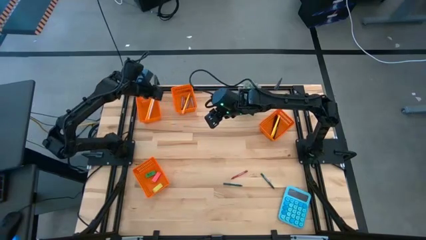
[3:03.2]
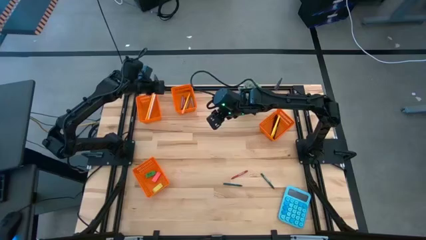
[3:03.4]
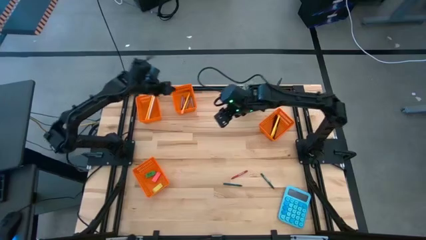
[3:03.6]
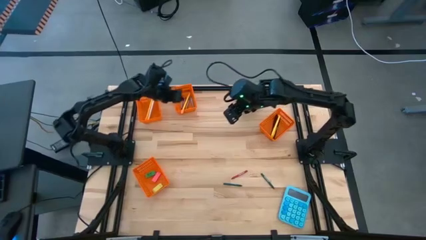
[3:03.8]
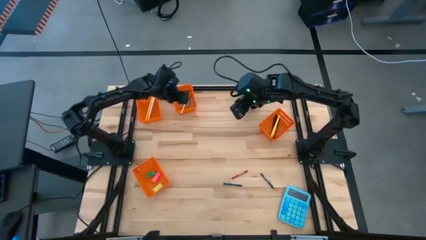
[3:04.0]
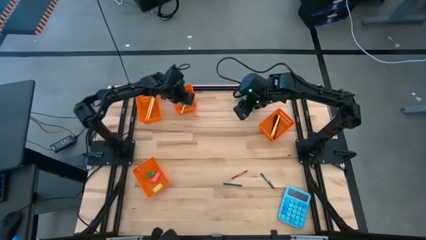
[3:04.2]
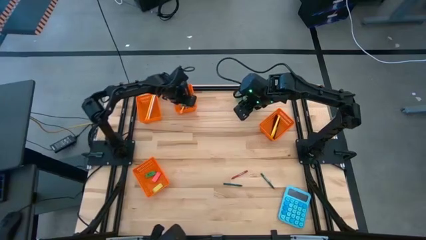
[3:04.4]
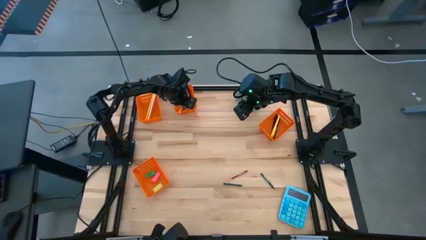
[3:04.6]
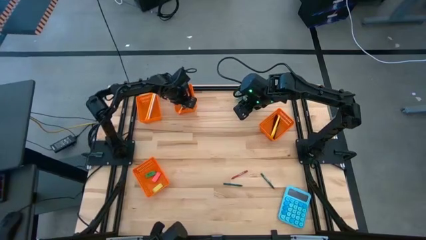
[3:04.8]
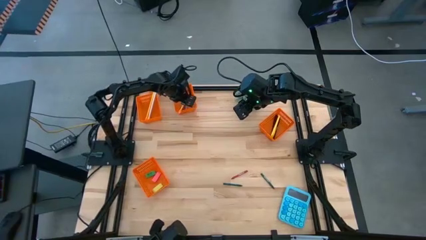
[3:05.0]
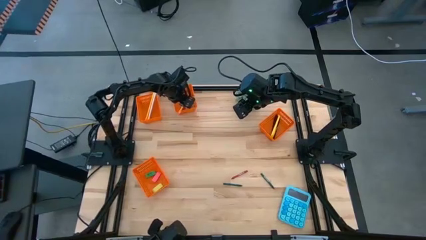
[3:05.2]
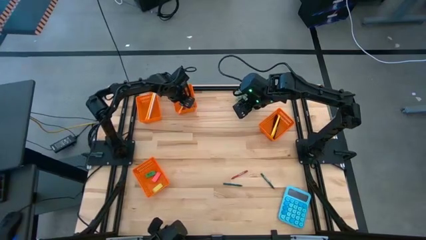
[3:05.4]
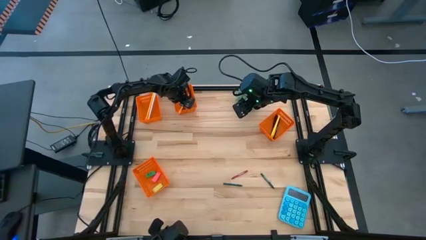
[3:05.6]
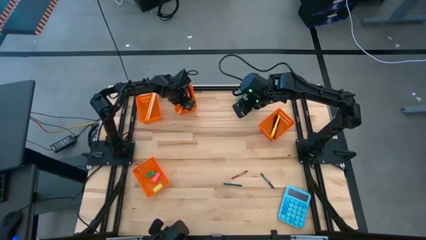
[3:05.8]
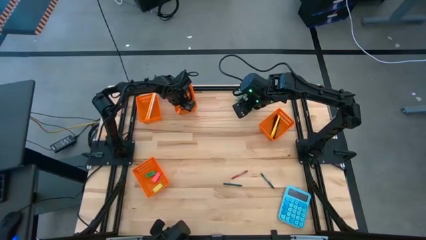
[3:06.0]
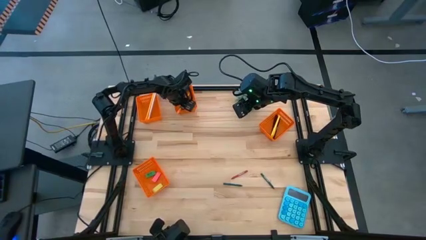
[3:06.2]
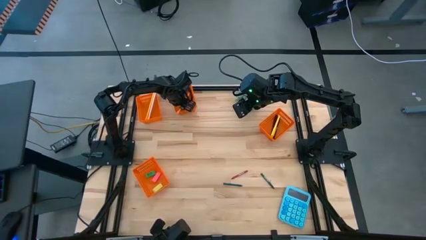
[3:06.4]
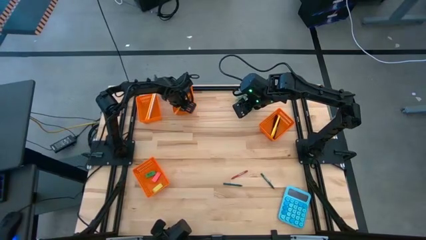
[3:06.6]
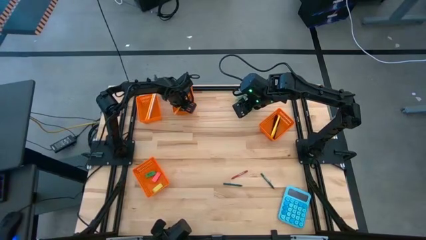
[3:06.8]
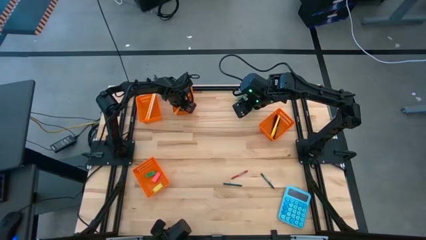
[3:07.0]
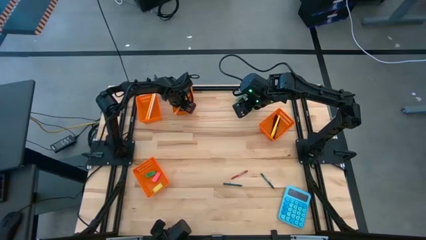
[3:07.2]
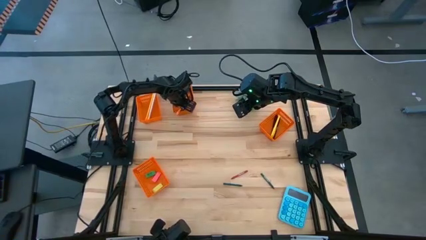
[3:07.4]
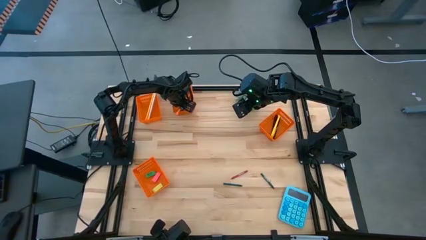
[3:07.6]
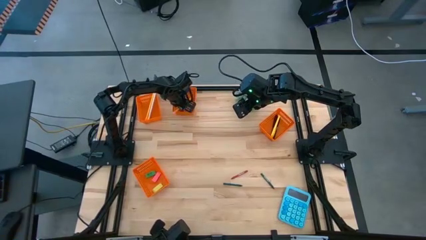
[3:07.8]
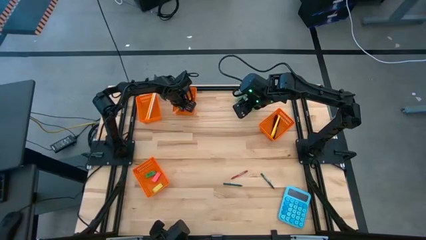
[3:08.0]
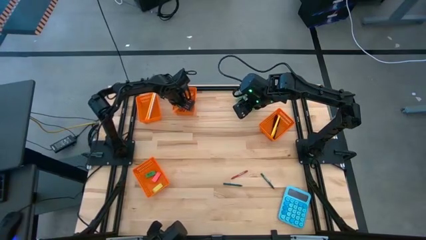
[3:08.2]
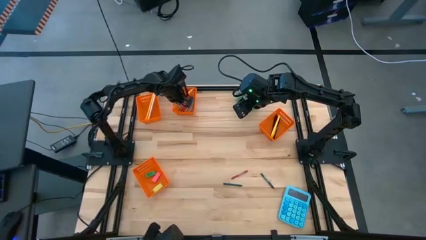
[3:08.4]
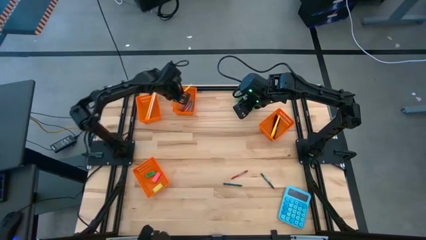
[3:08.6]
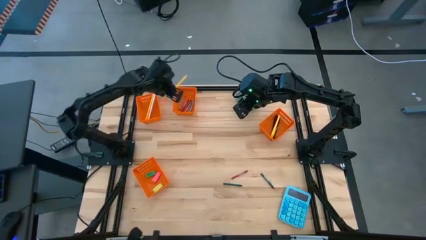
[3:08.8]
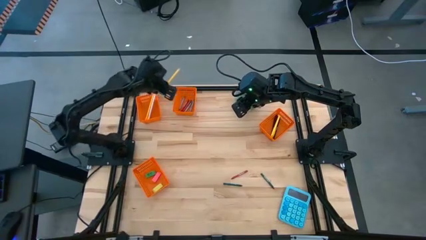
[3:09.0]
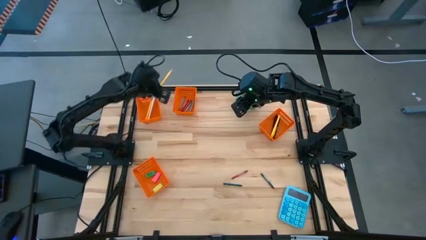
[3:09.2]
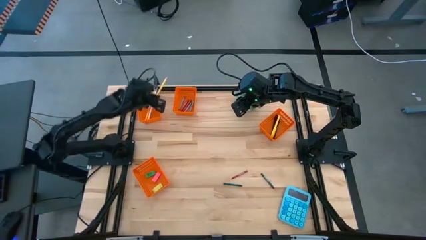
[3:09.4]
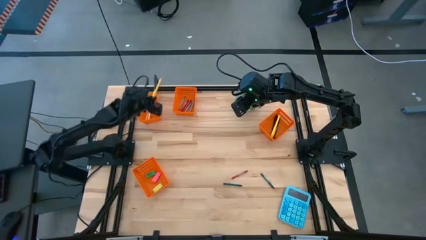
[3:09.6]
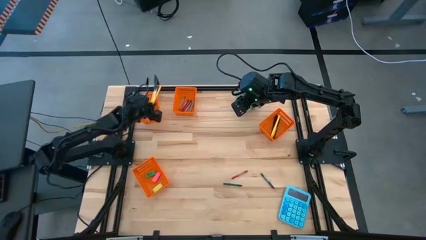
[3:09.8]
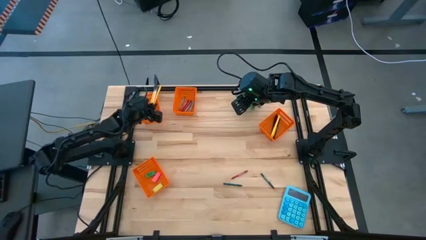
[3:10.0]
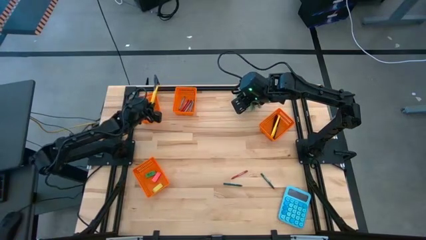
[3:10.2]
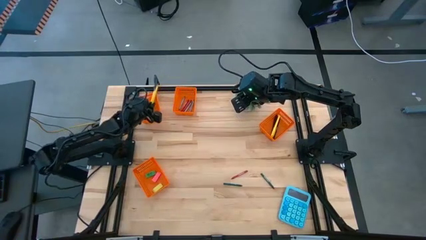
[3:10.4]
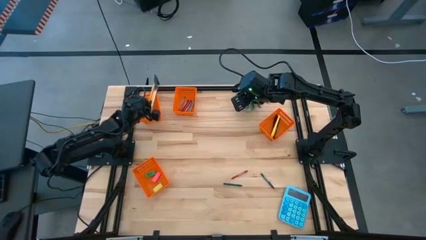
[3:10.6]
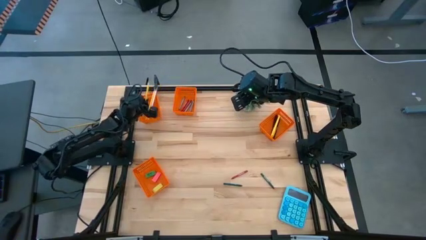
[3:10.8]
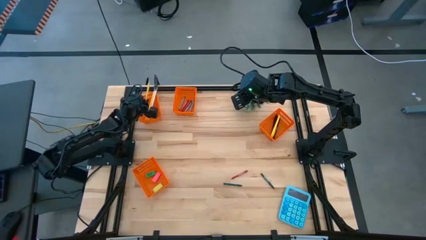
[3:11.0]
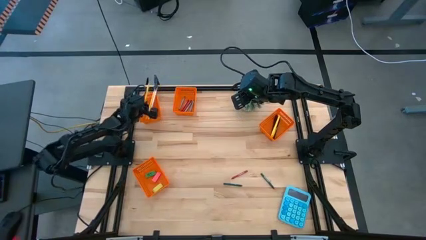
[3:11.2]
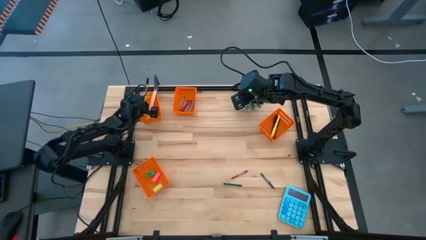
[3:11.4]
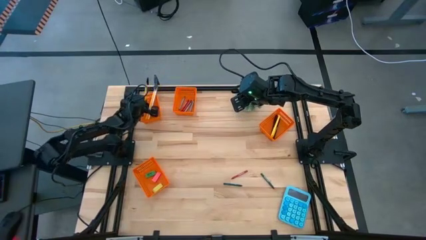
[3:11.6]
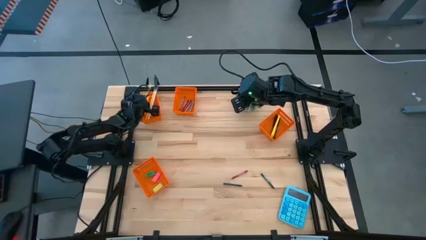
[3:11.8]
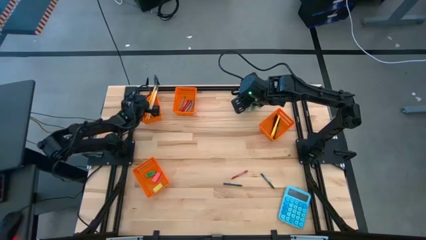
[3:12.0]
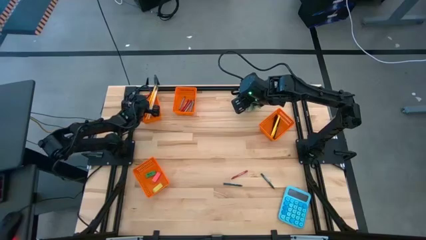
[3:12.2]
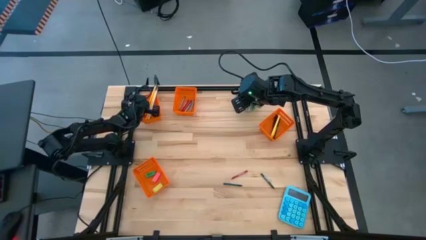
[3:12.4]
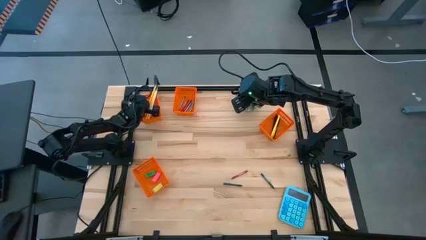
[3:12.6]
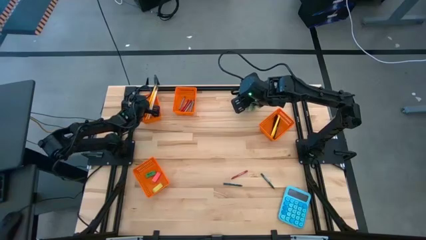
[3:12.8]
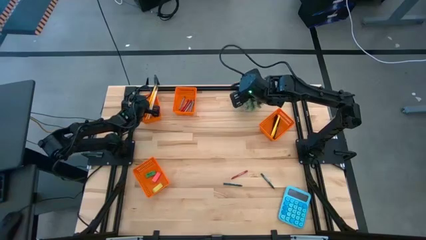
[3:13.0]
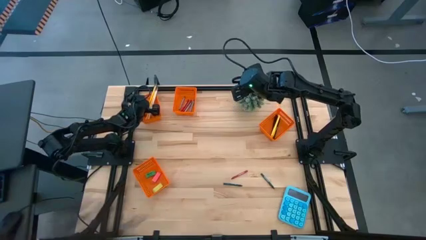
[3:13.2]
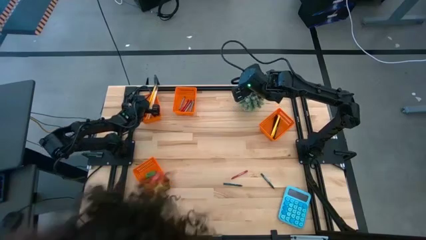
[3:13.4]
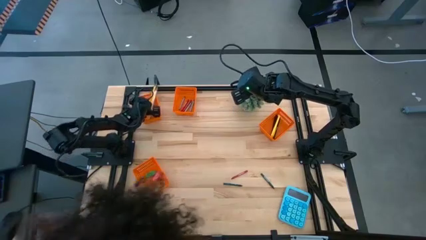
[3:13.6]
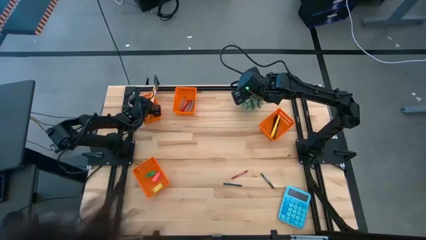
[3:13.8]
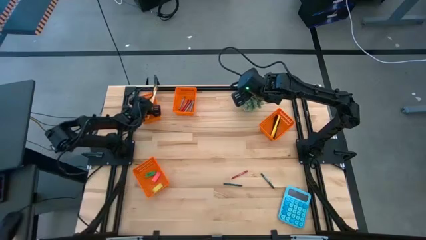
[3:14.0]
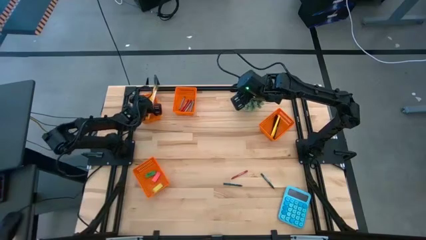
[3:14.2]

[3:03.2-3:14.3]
Task: Sort crayons/erasers/pens/pencils in bins
Move the yellow pencil from the middle bin to the top left bin

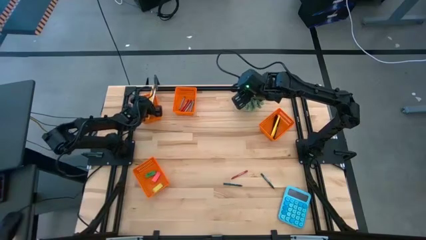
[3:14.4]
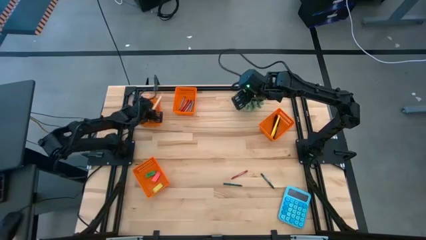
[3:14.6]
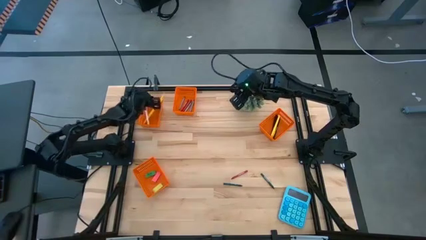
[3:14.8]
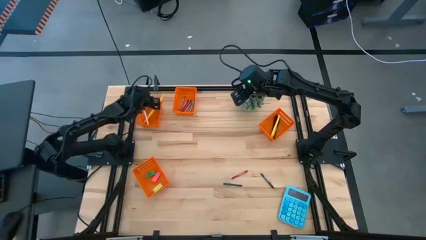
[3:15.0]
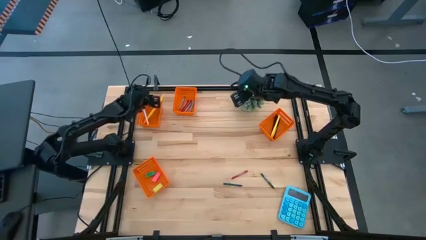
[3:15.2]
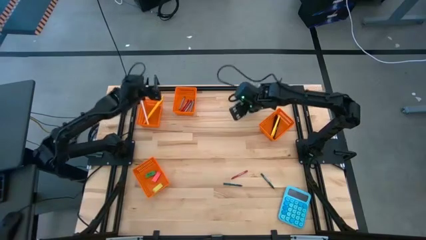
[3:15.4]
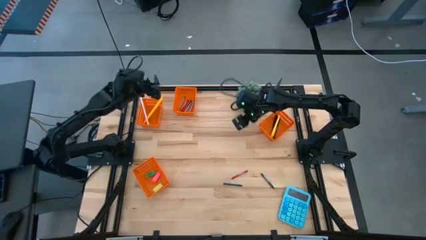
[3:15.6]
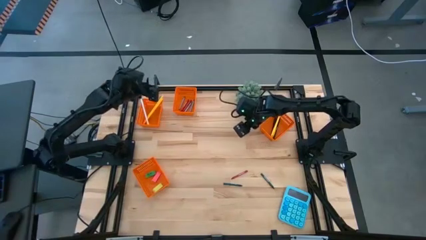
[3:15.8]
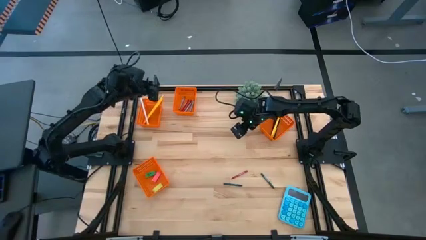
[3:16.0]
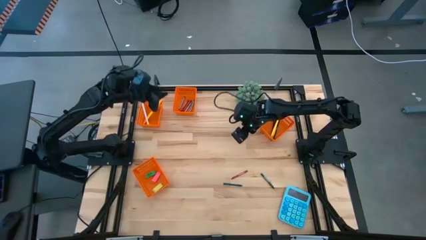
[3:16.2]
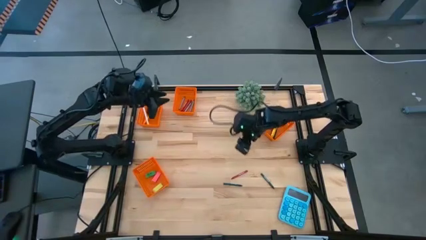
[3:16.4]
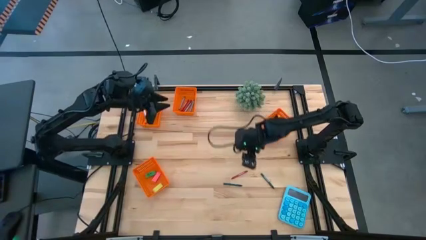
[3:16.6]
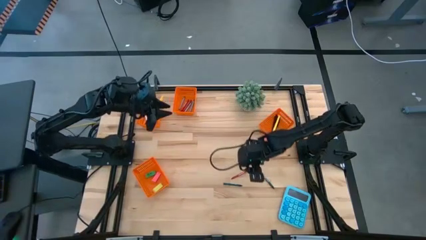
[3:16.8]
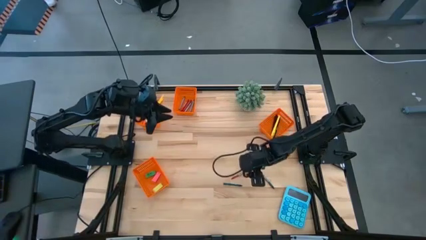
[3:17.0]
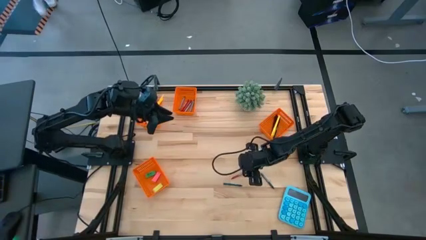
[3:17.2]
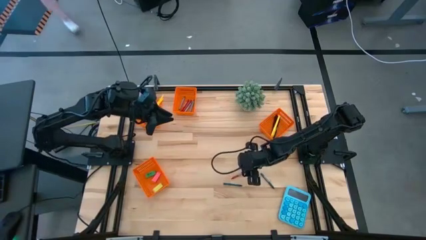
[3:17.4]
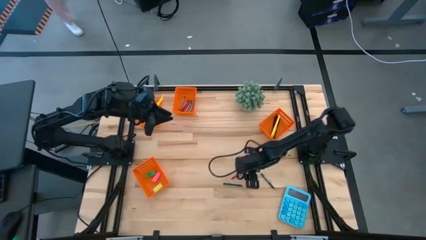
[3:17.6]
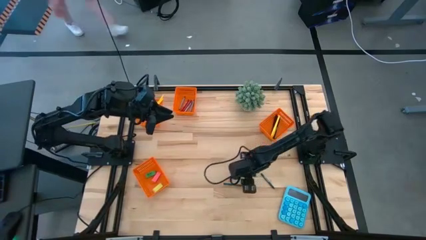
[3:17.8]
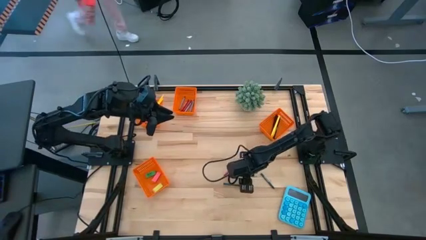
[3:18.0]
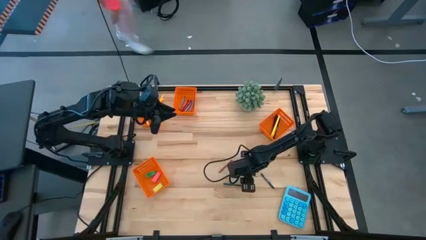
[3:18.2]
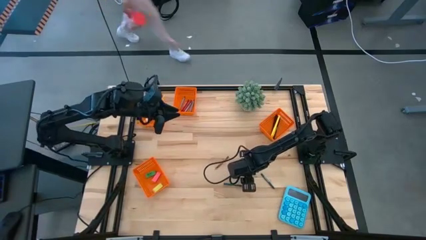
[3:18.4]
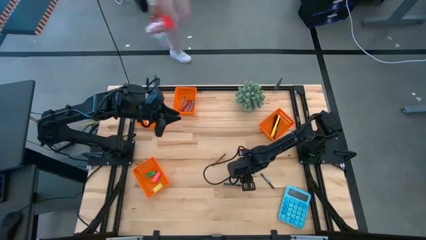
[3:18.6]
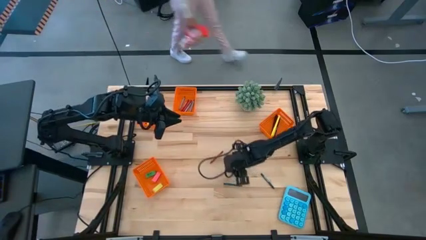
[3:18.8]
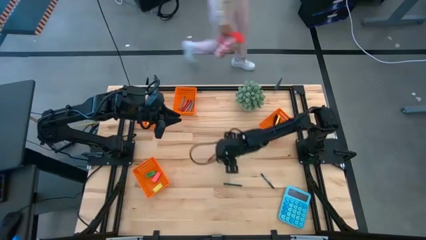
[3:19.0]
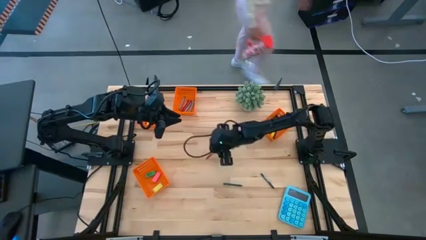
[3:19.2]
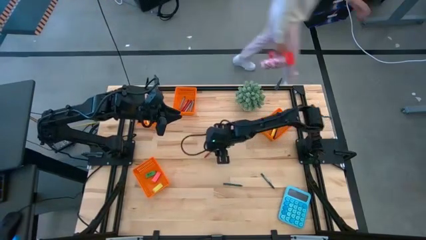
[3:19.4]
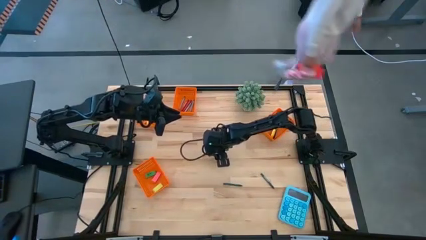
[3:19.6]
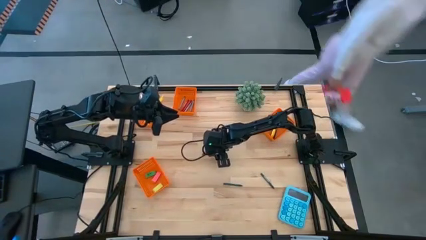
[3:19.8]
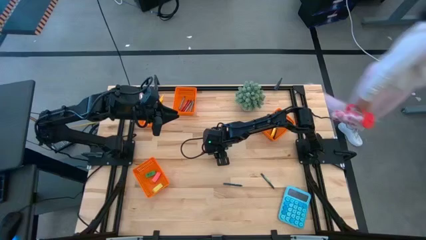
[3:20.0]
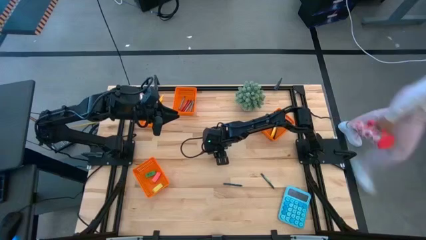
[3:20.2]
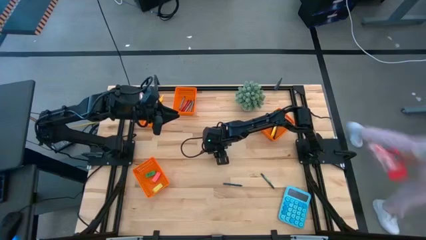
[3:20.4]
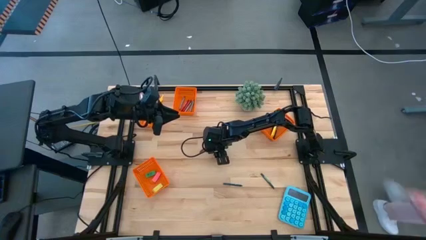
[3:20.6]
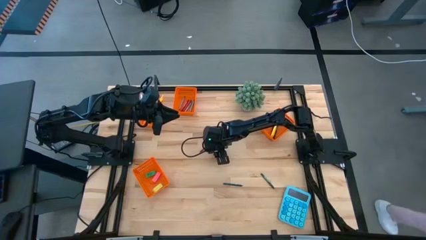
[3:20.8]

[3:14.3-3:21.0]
Put the red crayon into the middle orange bin
